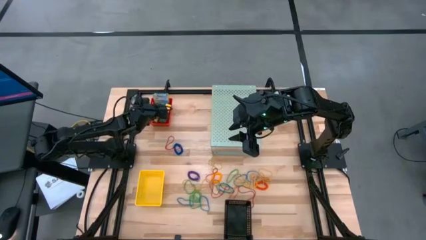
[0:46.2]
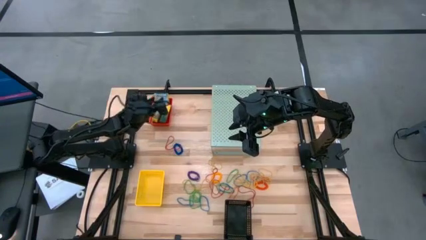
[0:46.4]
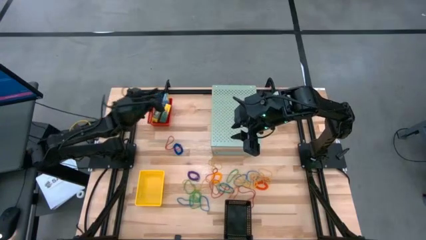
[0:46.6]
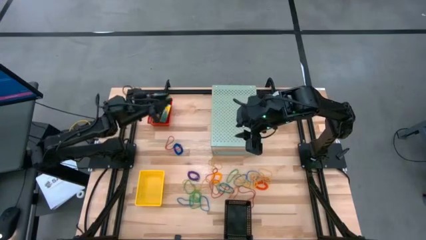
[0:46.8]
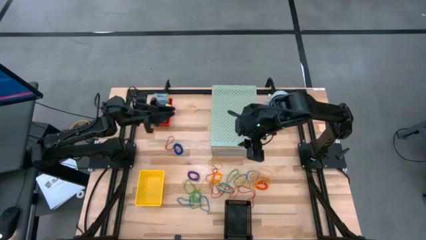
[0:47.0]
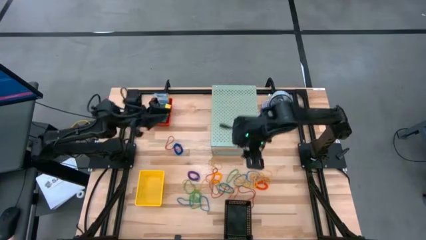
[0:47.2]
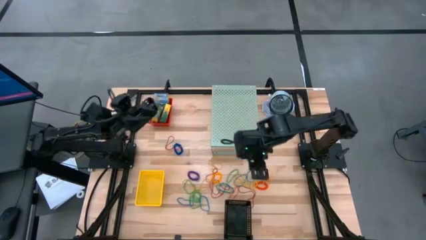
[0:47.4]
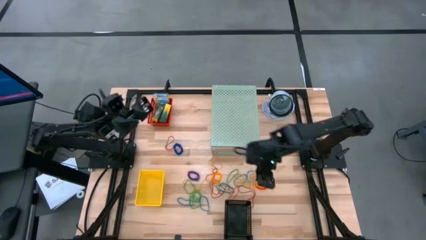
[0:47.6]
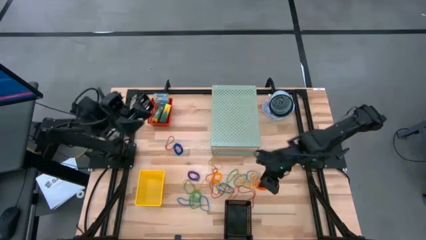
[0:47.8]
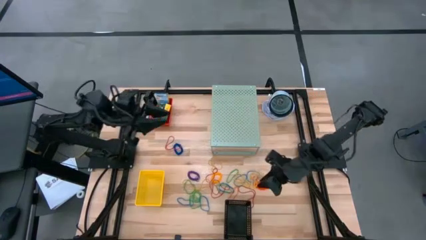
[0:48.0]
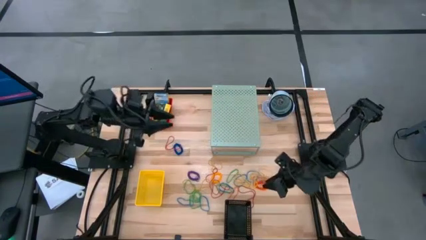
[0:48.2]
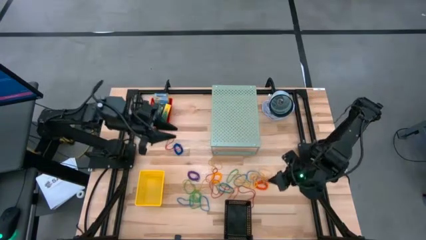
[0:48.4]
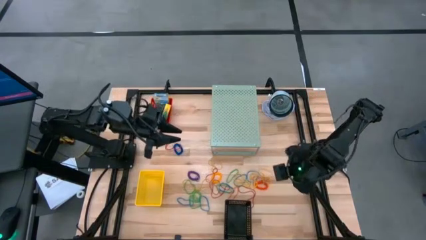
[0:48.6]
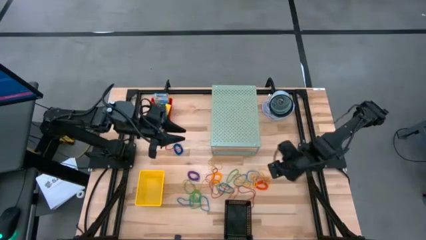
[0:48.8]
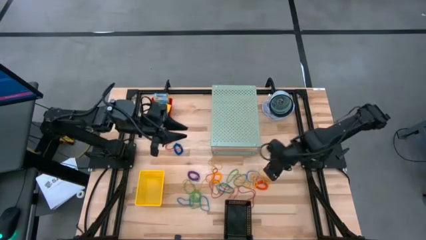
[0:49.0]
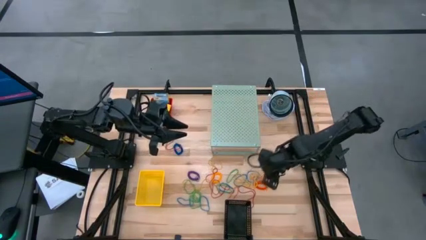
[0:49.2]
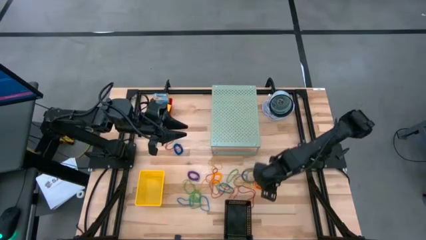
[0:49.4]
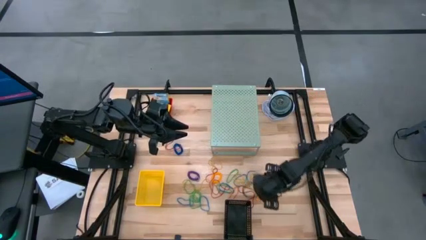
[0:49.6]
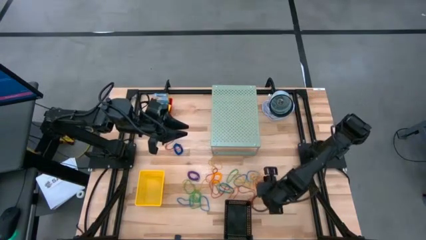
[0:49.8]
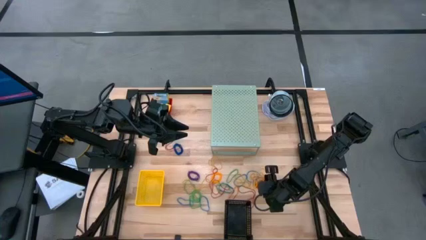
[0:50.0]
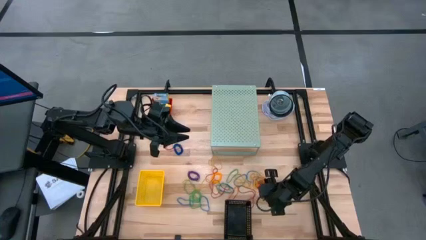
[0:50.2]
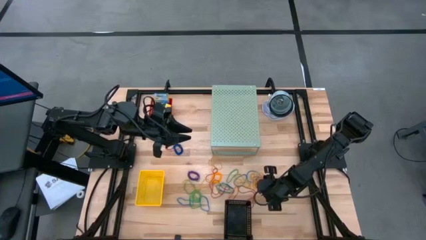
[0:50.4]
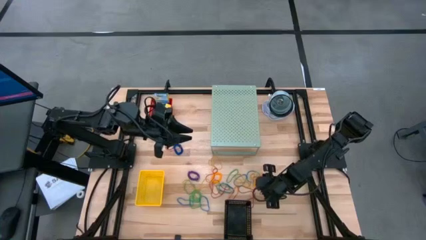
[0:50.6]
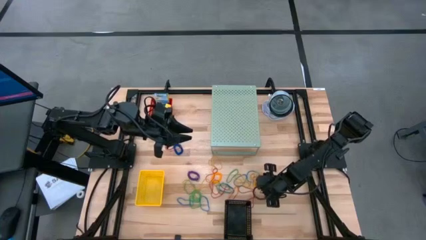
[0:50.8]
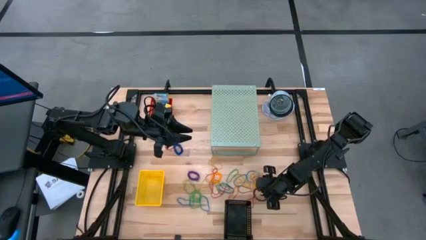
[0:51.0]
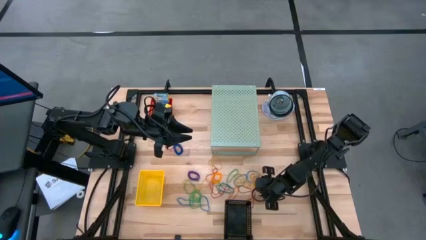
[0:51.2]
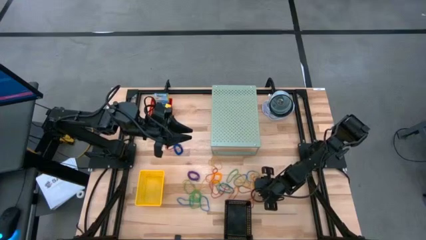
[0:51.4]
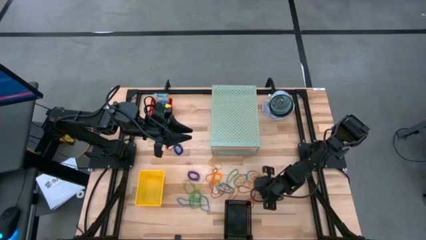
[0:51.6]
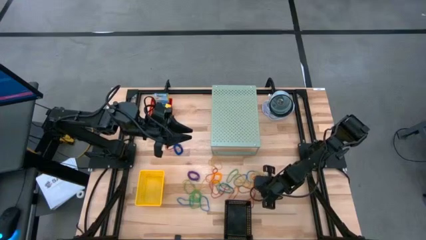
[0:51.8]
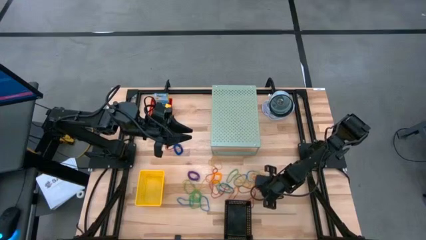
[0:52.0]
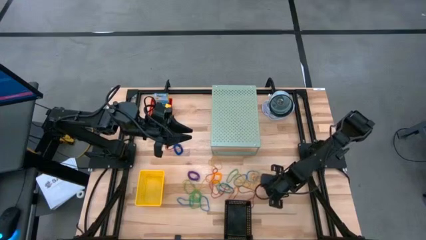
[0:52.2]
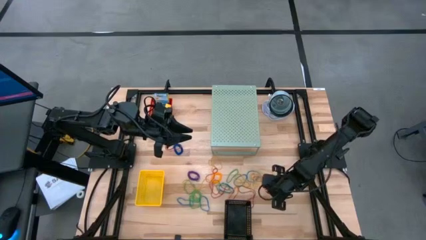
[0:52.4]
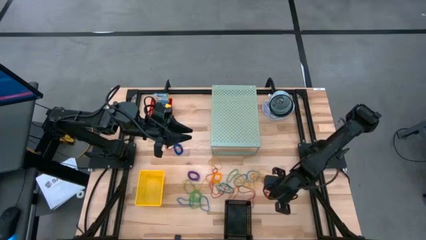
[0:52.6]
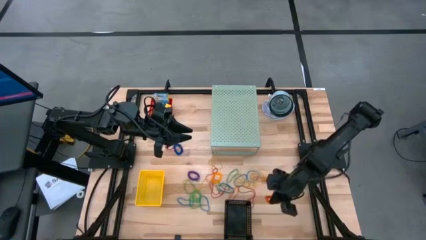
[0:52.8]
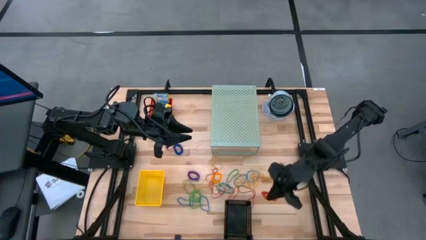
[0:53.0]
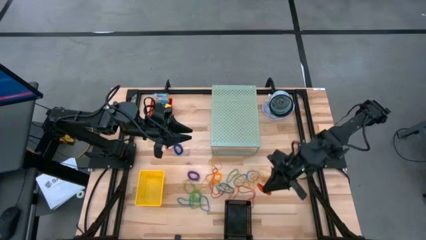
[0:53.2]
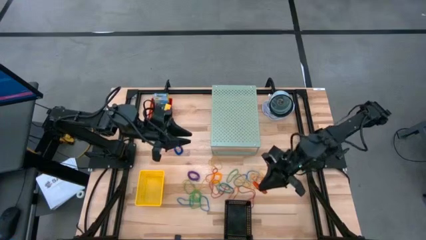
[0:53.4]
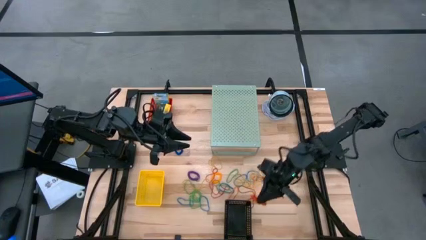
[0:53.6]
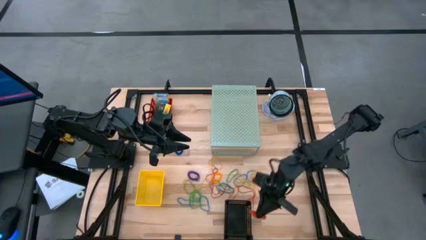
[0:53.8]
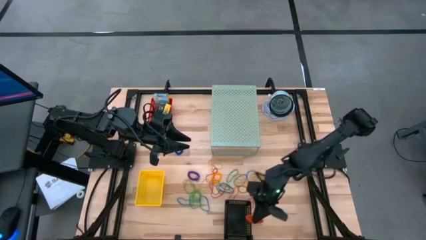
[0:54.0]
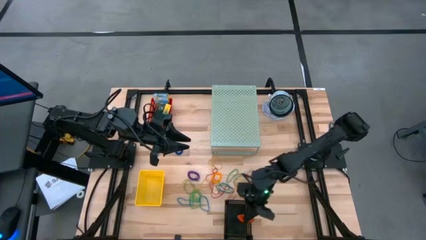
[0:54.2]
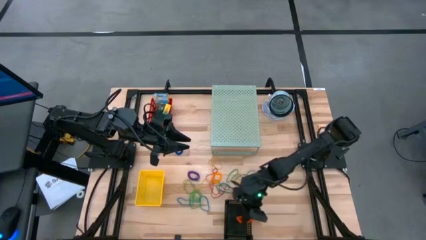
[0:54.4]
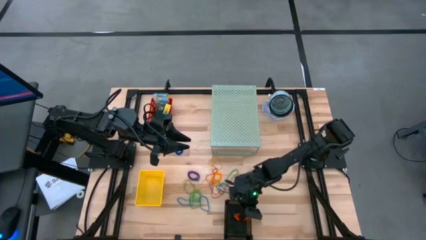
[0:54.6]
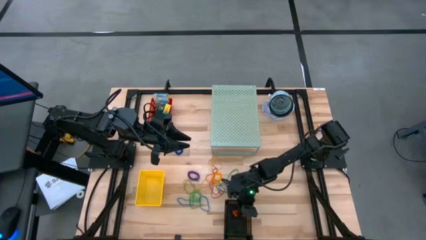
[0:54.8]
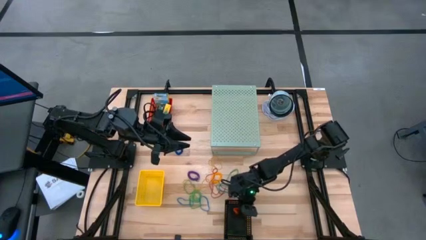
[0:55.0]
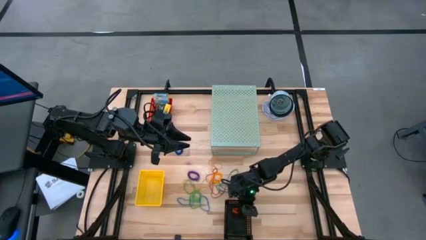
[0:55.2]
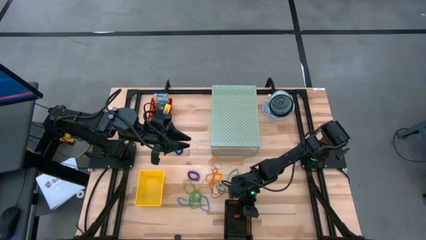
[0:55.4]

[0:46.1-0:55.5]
Task: Pick & Place Office Desk Supplies
Put the orange spring keychain into the black bin

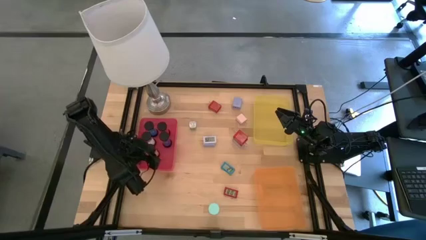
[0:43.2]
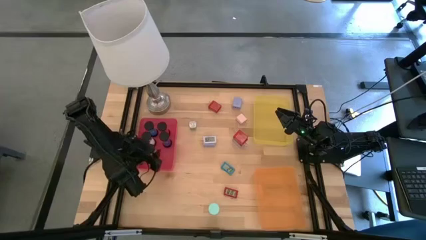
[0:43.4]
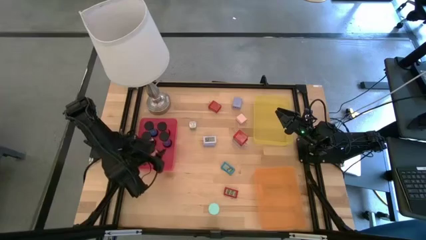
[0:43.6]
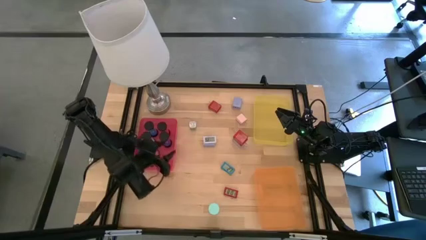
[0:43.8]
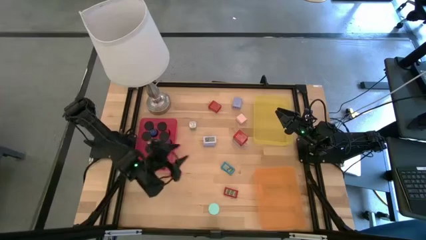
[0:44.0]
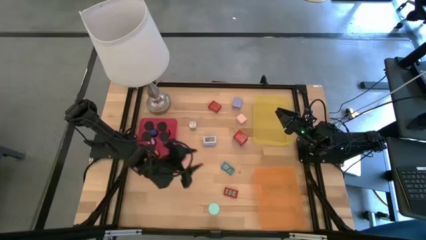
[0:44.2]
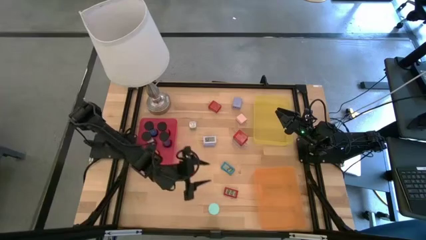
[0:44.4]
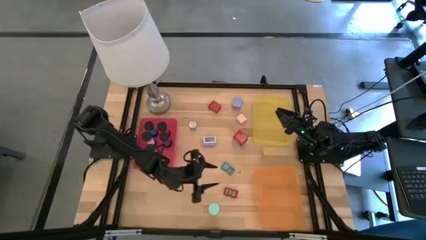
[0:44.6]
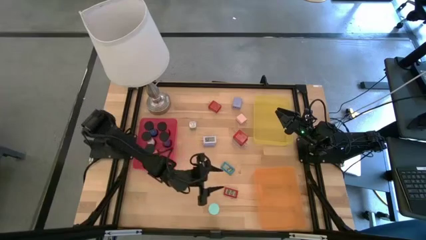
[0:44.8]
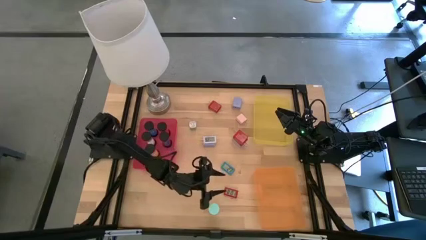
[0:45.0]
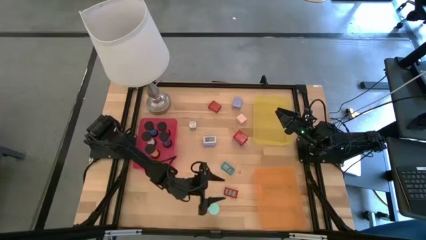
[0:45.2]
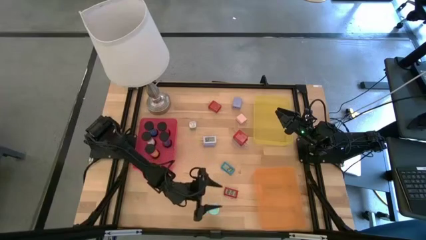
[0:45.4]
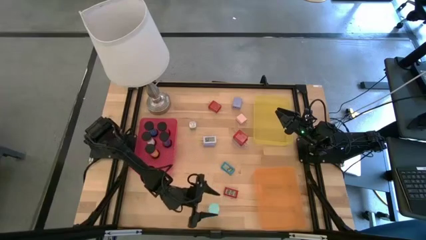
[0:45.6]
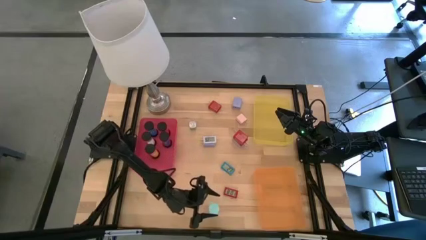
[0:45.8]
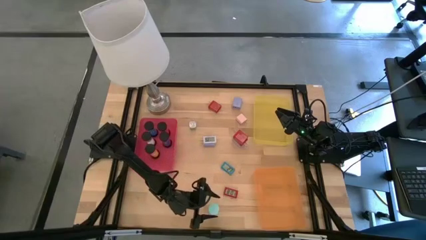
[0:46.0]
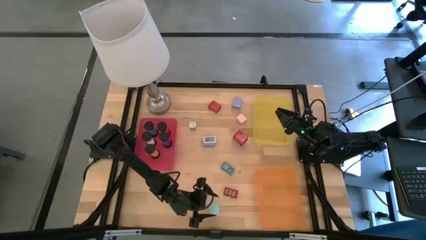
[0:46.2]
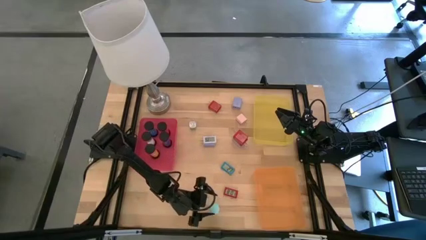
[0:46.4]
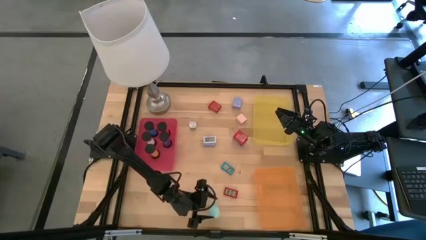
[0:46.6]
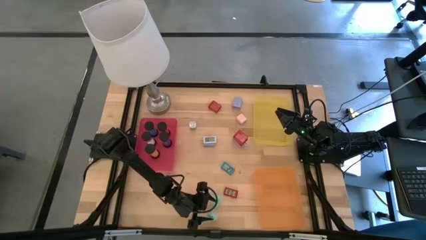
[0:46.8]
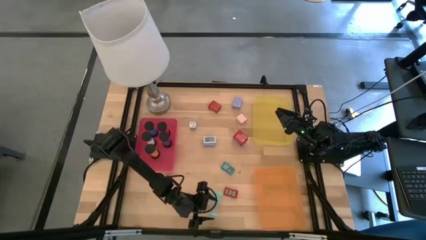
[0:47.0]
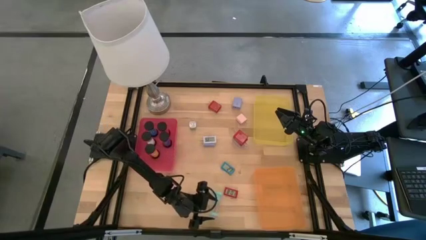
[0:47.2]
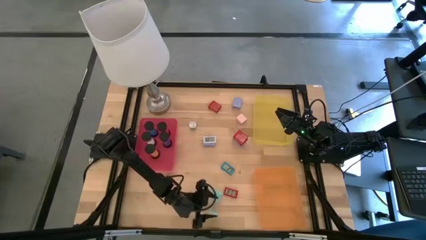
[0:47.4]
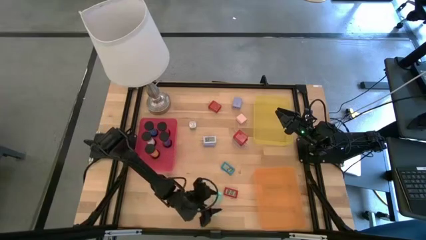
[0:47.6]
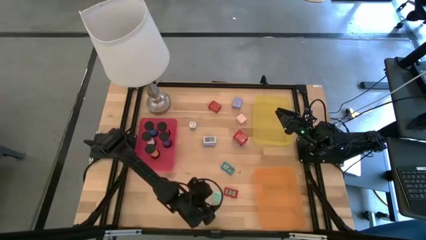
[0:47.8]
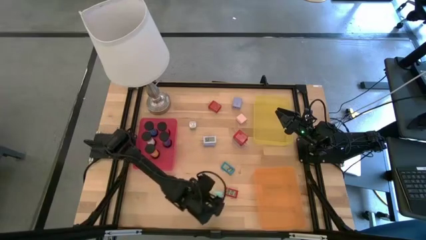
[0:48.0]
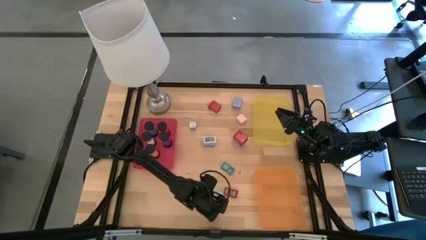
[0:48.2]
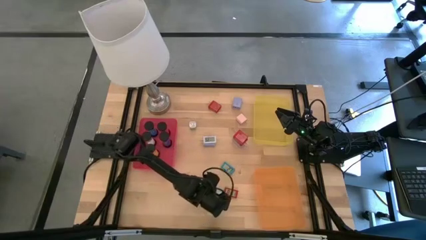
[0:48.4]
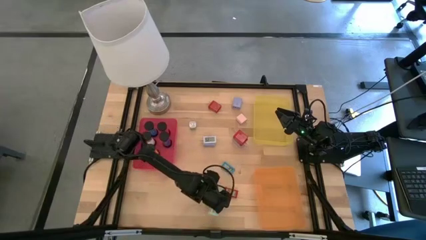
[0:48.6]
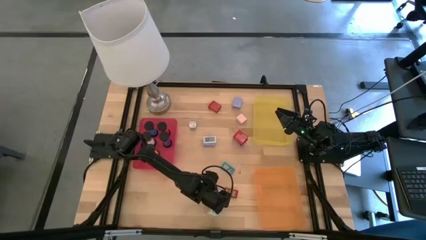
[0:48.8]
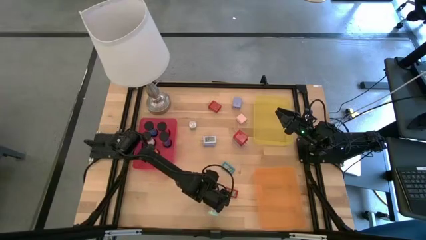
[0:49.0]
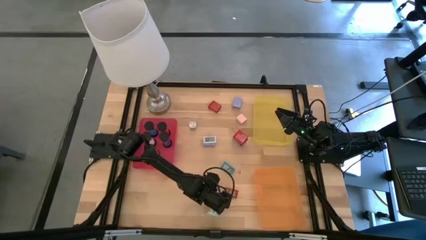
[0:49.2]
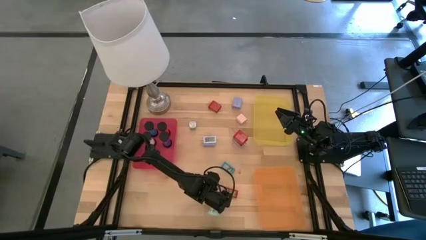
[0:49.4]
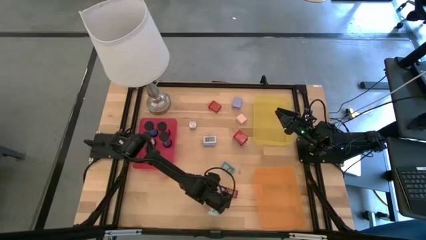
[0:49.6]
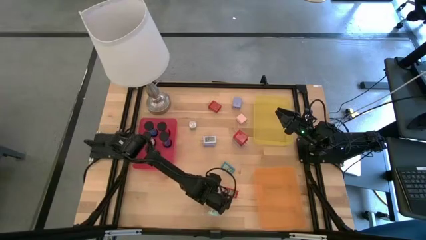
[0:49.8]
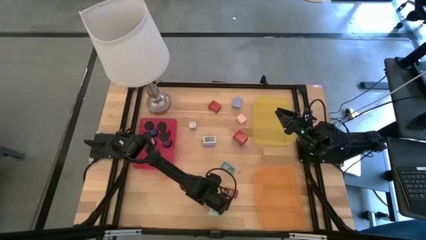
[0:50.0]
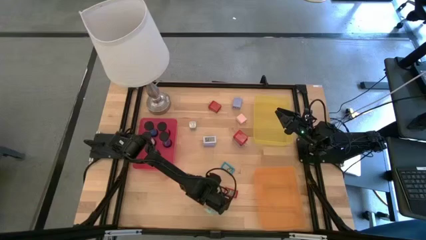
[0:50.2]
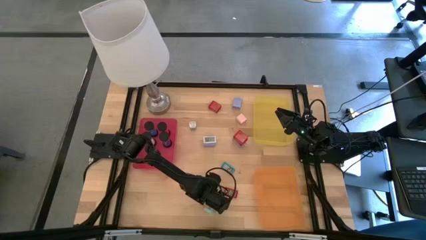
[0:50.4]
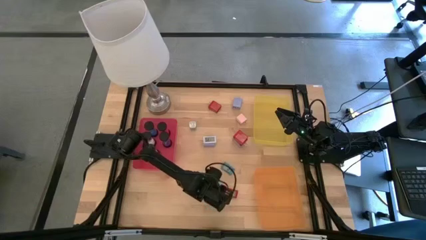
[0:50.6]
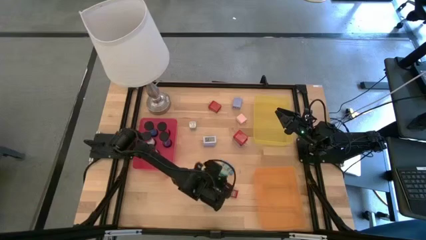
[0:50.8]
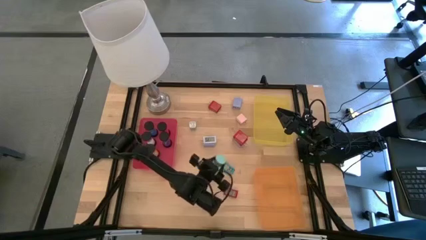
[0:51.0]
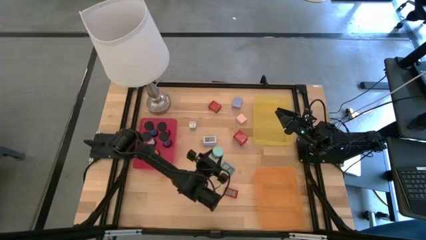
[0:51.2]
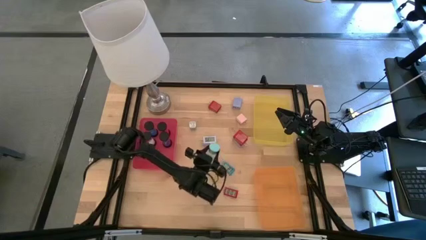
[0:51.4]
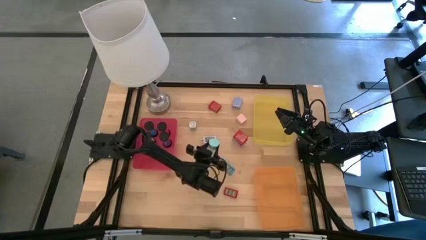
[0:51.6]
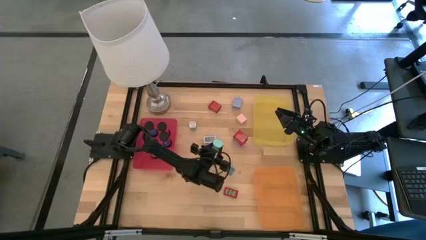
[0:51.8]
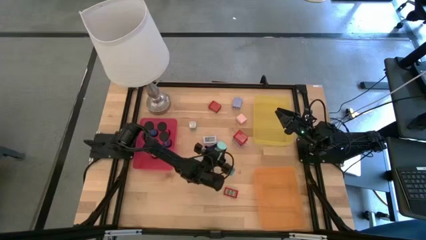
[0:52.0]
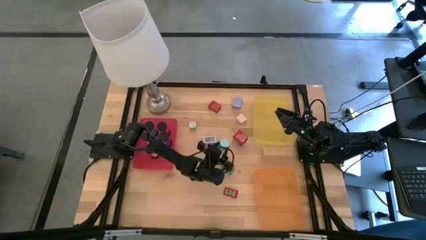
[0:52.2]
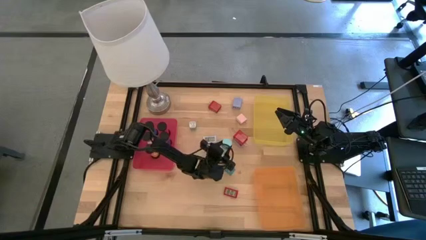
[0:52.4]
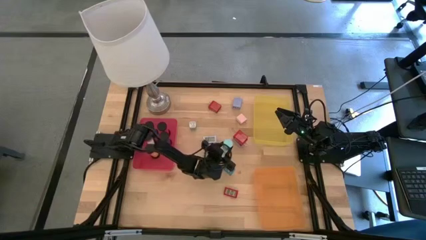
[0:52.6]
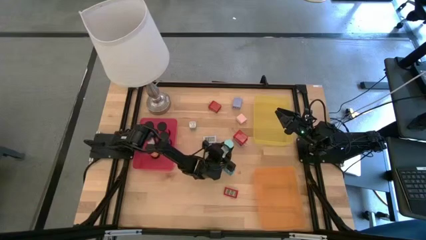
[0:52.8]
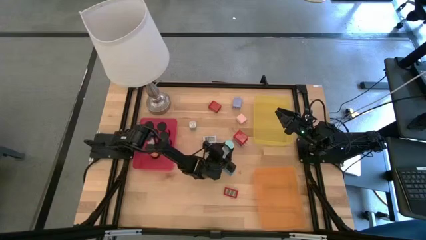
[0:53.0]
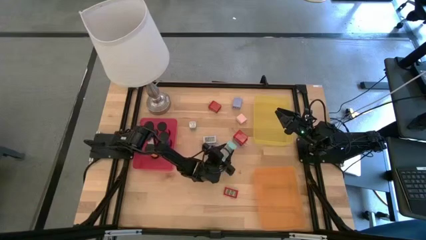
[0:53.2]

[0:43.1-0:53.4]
Task: Pick & Place Office items
Put the light blue hourglass timer into the red bin
